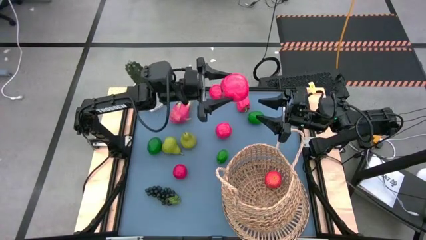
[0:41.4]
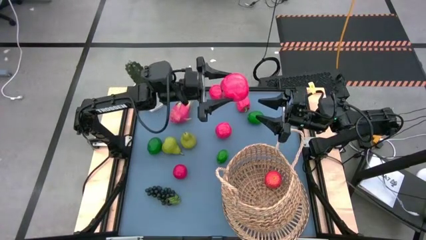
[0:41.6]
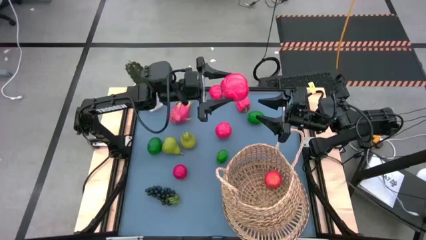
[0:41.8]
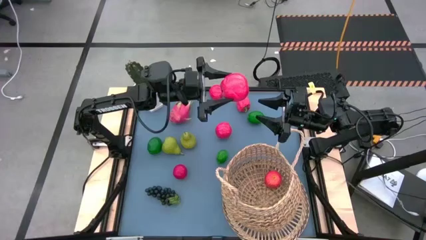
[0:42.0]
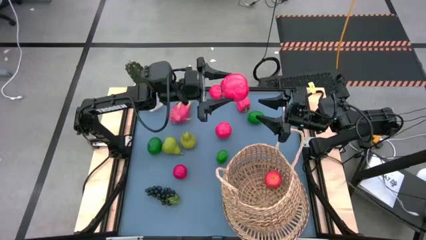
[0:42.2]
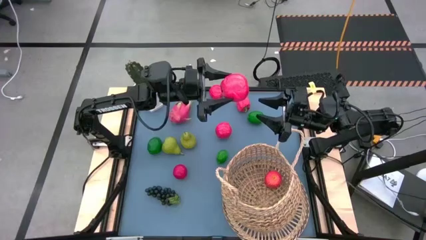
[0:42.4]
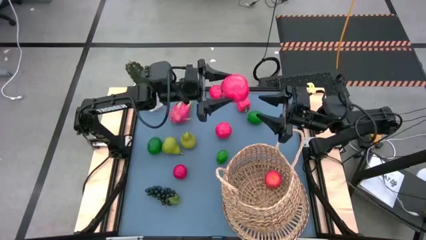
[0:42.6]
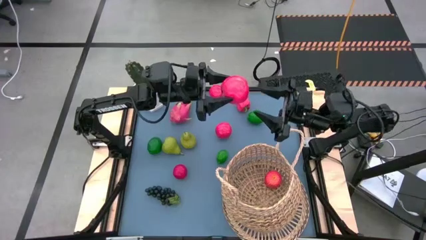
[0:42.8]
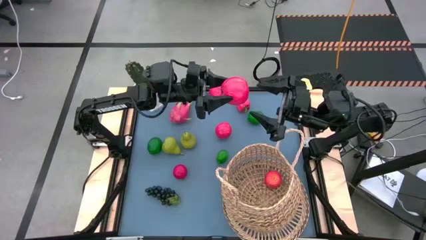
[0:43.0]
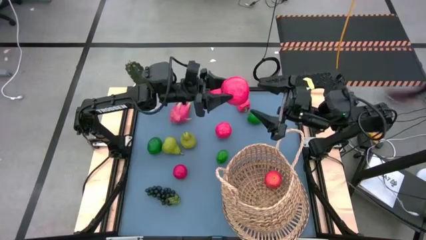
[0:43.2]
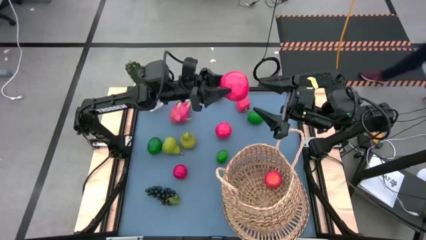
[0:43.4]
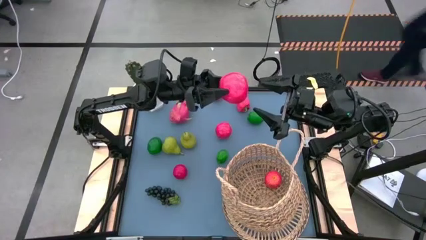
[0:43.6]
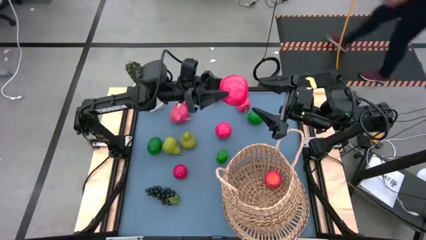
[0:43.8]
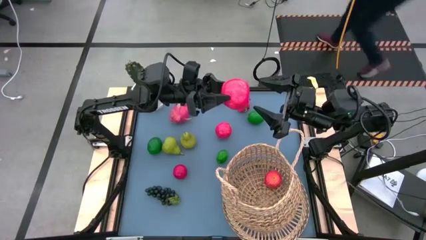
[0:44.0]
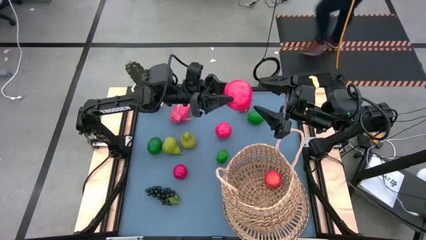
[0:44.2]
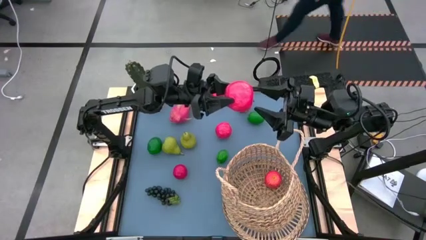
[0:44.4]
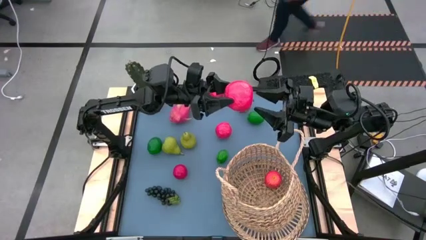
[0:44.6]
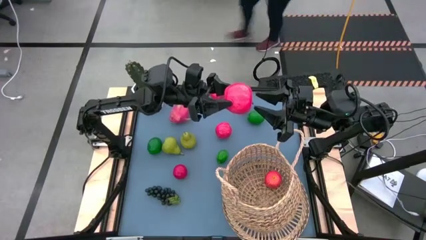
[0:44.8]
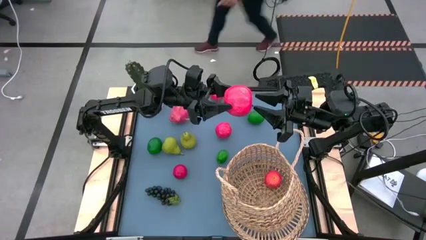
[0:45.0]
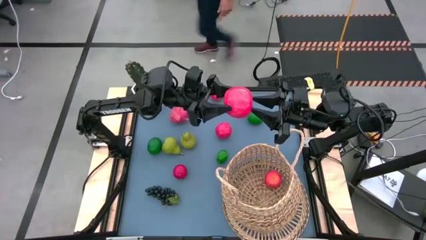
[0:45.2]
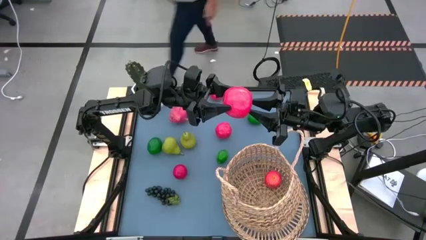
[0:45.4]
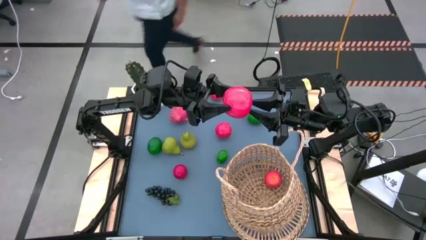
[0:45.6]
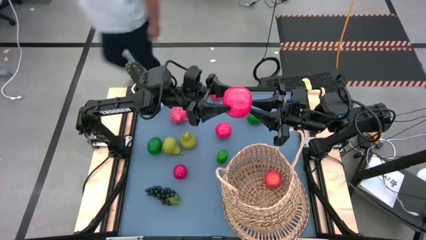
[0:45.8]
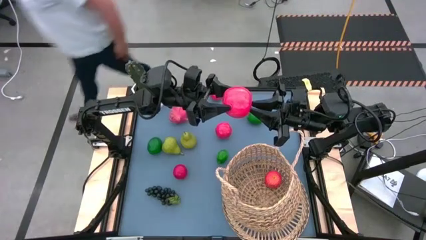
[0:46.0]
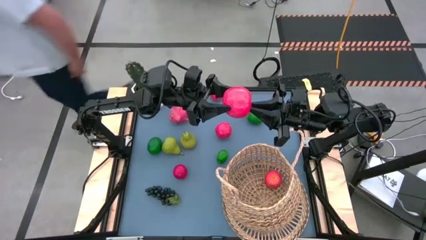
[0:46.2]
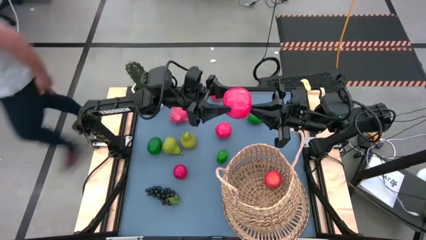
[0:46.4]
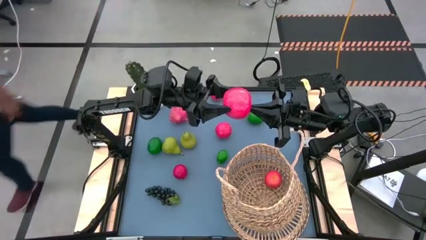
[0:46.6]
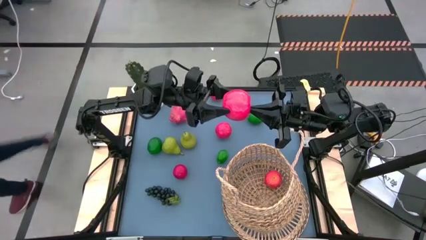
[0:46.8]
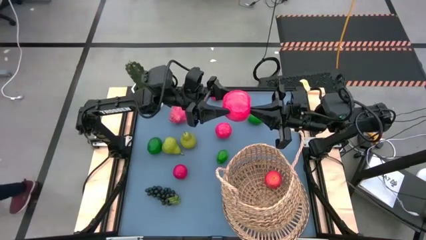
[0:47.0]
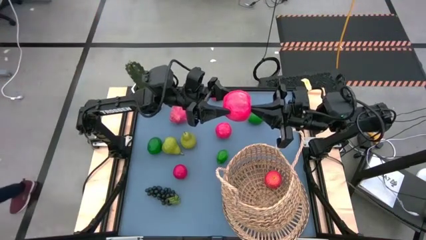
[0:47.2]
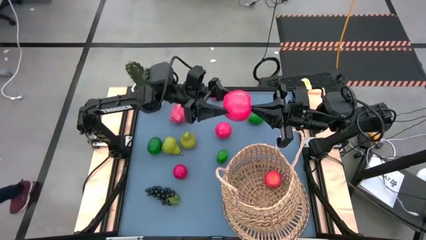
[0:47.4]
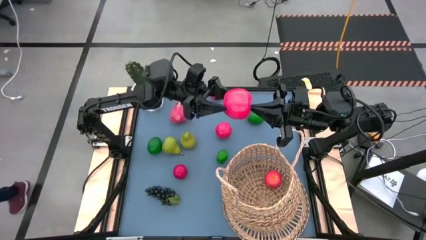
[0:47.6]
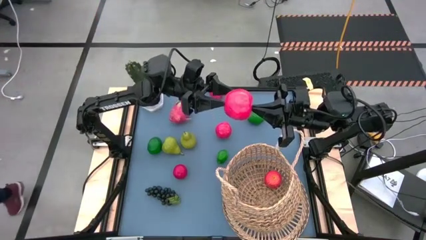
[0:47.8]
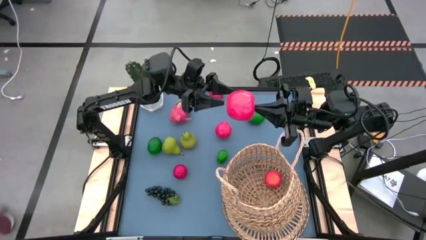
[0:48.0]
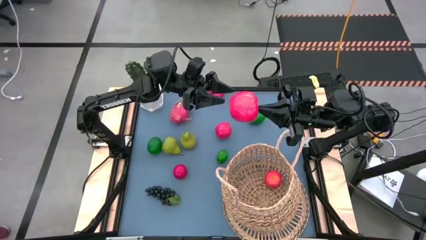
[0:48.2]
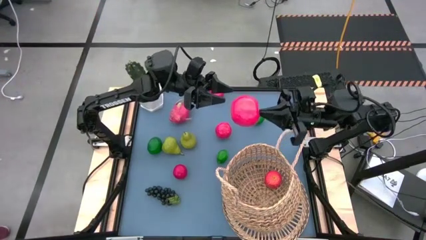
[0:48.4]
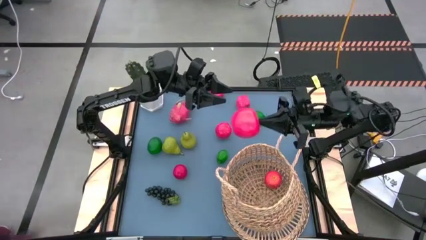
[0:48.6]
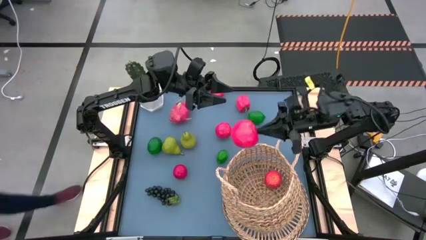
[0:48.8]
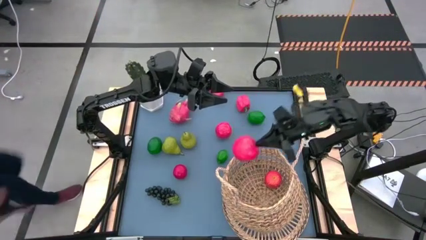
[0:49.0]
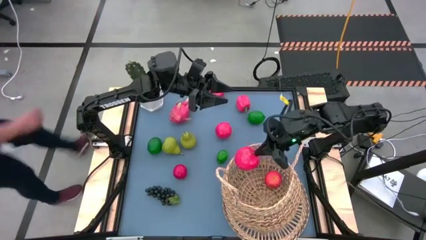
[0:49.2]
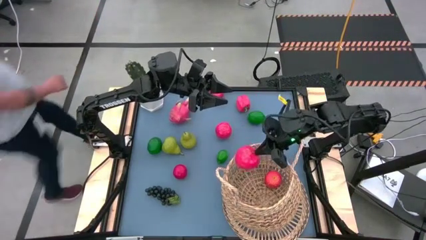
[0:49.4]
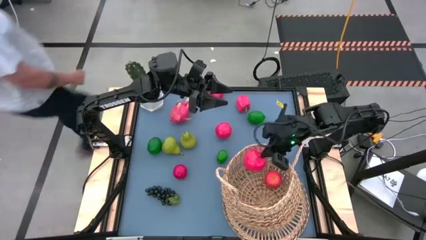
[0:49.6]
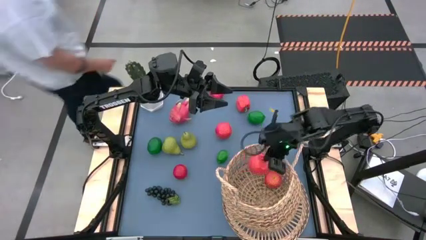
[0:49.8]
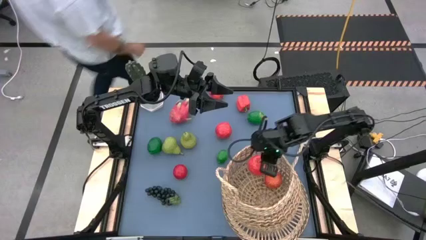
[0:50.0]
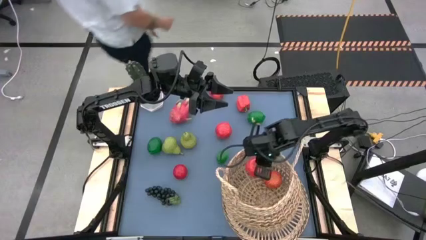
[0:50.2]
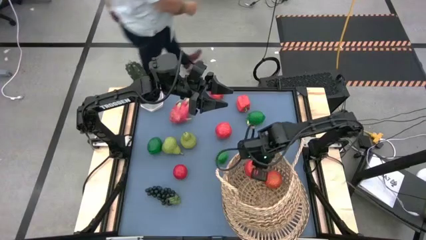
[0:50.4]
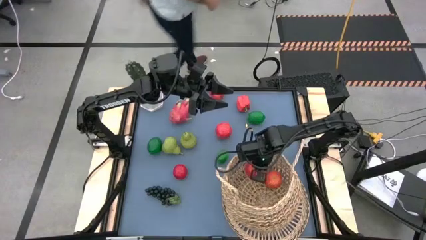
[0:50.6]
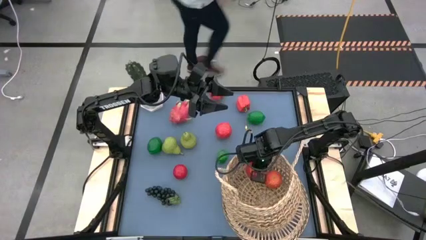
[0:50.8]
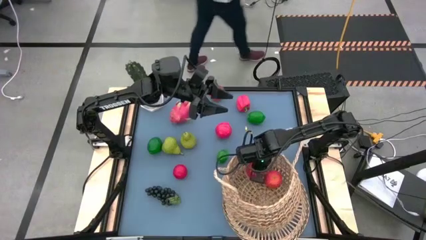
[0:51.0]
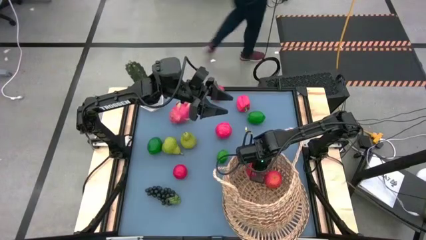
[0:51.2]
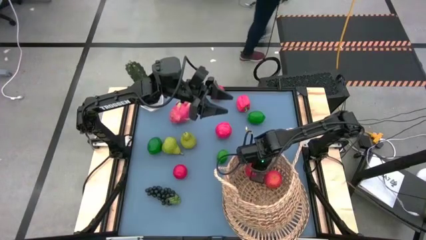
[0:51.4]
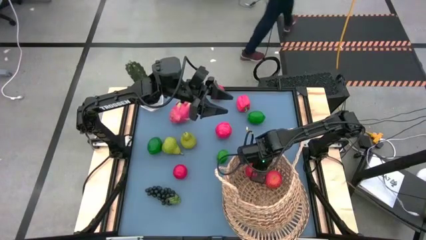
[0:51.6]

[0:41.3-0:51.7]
Task: Build produce basket
Put the red apple into the brown basket

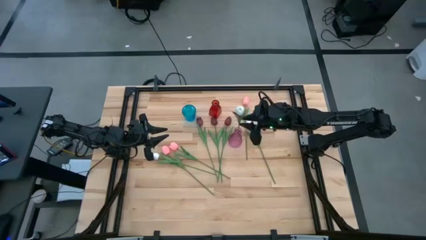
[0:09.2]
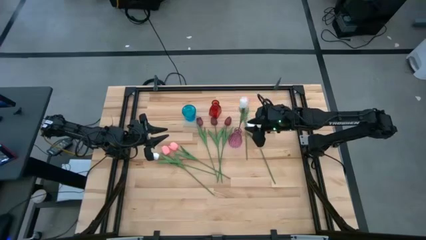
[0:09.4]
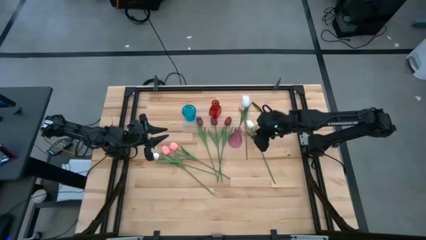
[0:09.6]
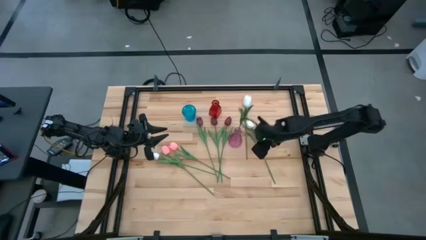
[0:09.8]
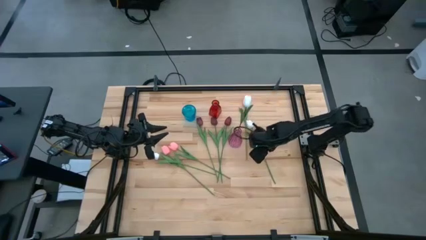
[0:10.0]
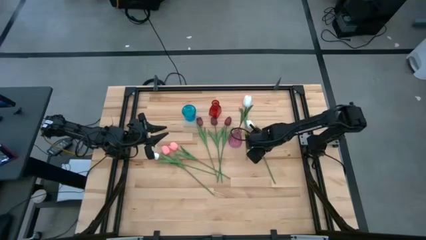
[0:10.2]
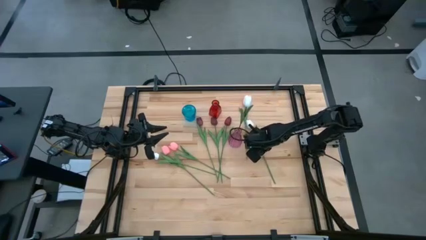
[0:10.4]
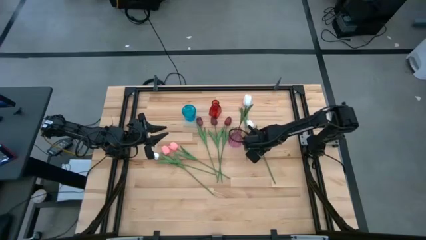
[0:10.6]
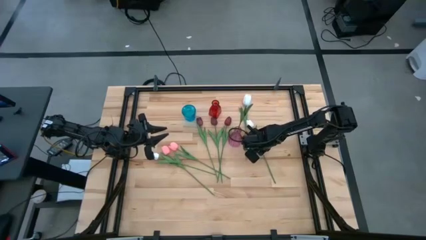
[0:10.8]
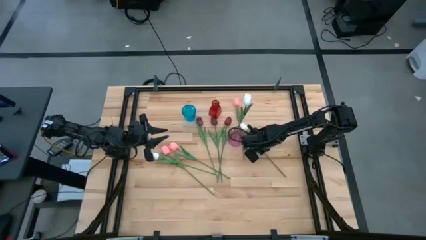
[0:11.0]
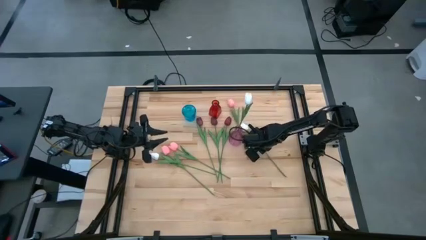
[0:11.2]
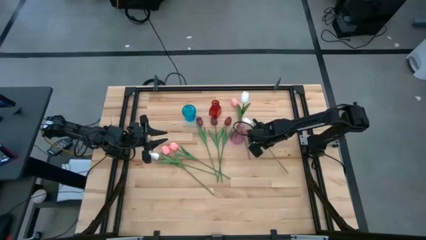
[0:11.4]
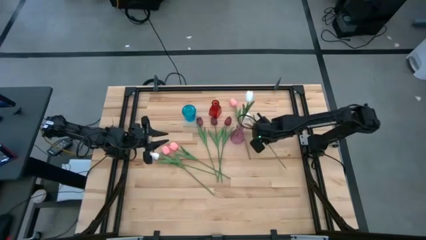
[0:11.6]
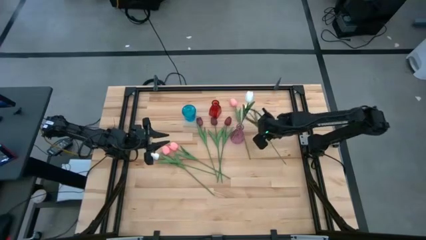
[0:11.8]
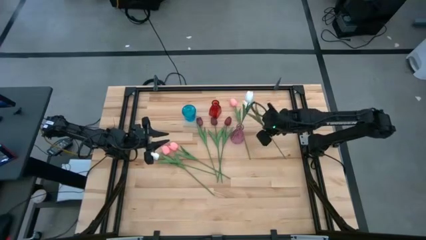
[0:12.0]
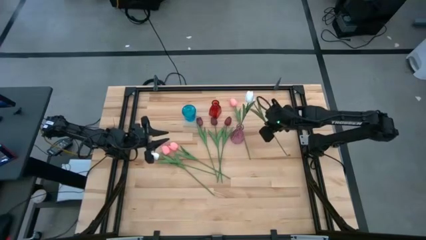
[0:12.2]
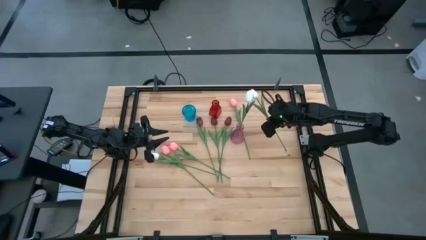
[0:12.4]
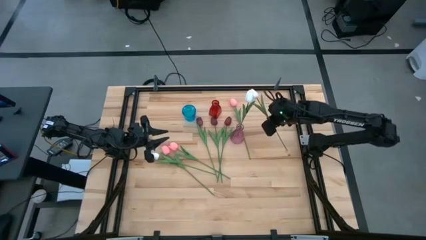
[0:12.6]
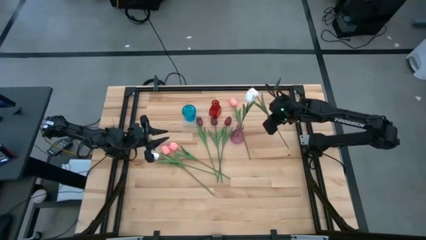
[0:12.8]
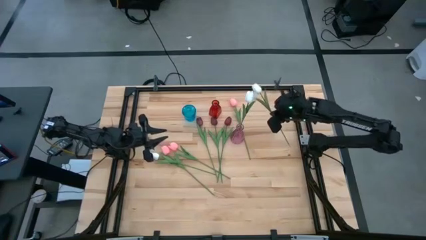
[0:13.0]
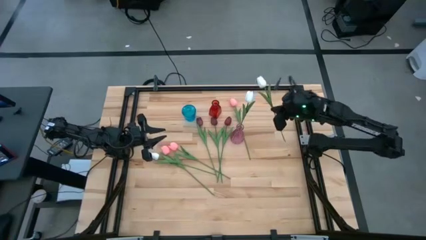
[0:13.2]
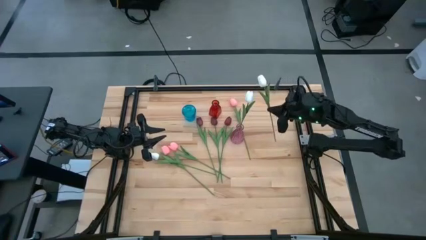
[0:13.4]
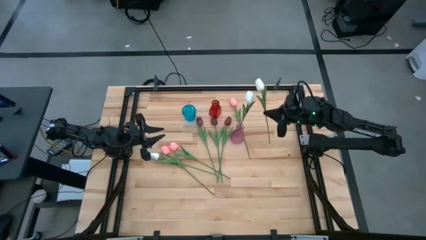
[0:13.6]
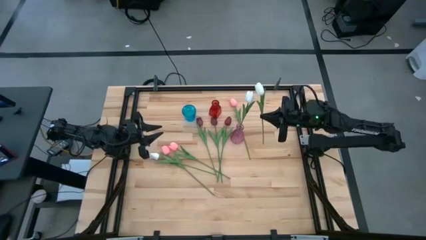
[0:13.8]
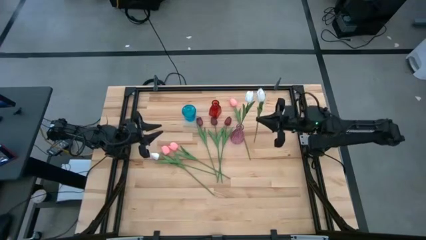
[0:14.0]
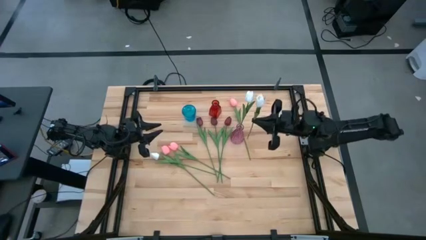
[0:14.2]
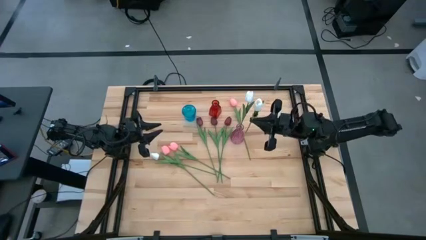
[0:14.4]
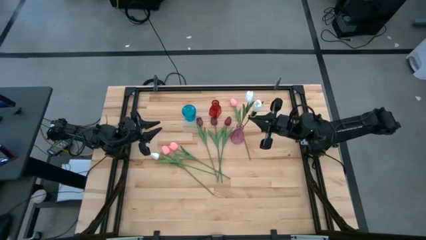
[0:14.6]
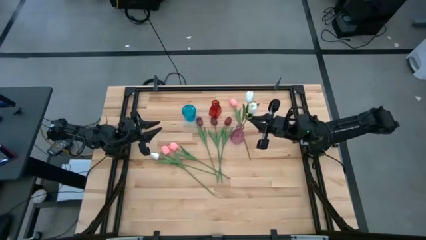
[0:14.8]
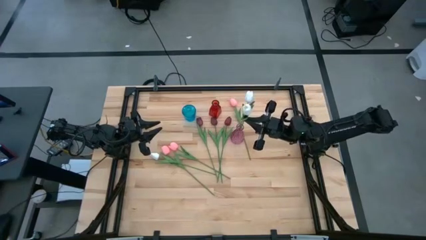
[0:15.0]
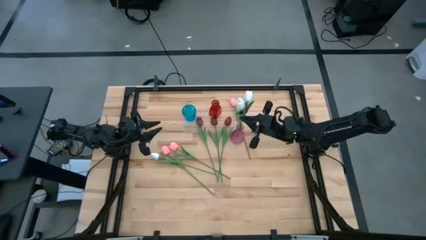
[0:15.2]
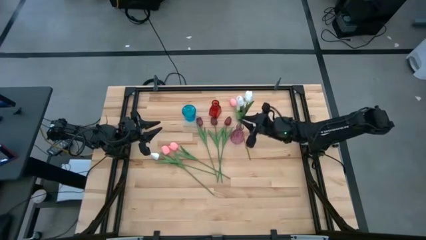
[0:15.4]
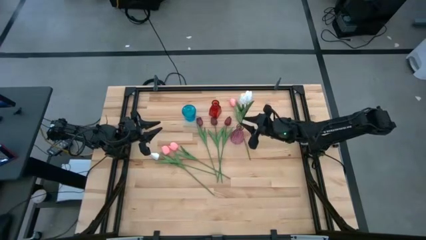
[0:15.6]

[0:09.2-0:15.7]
Task: Sort flowers into vase by color
Put the right white flower into the pink vase
